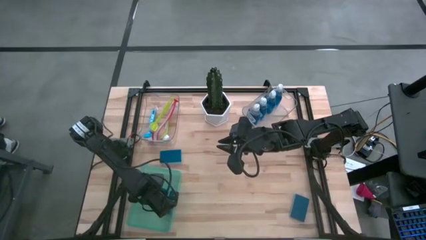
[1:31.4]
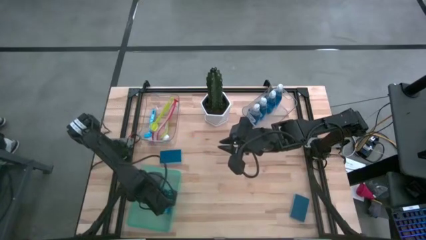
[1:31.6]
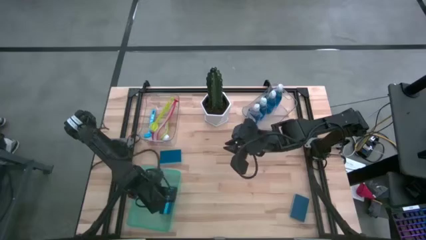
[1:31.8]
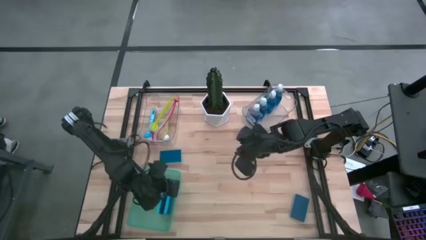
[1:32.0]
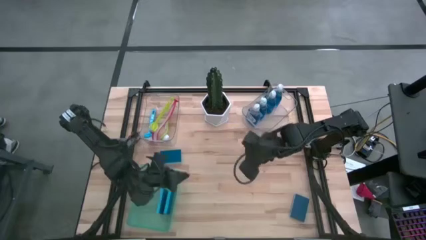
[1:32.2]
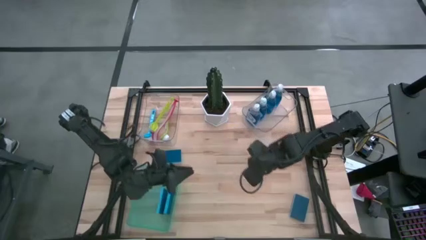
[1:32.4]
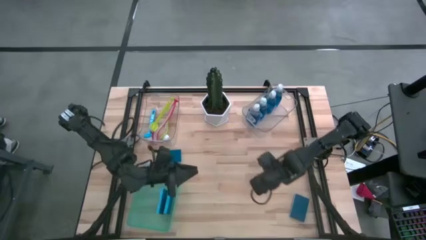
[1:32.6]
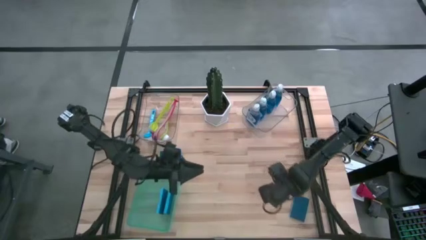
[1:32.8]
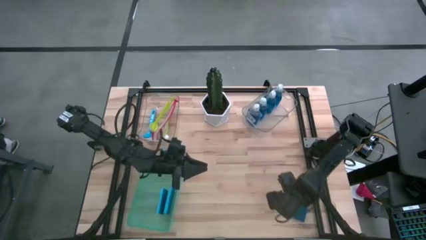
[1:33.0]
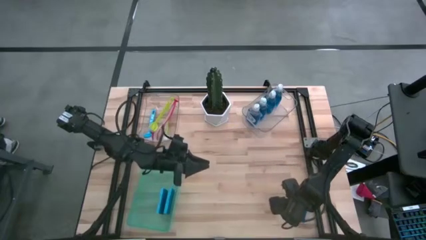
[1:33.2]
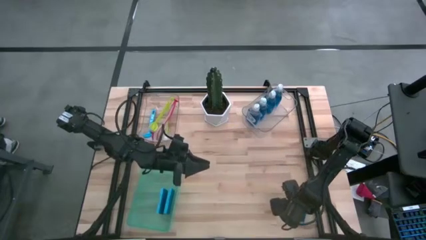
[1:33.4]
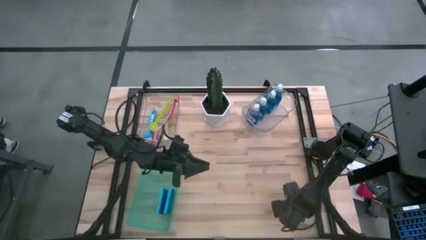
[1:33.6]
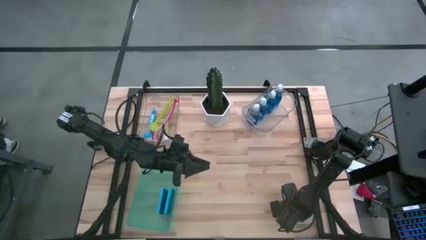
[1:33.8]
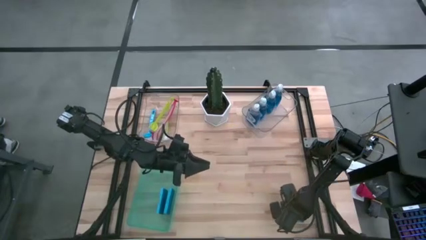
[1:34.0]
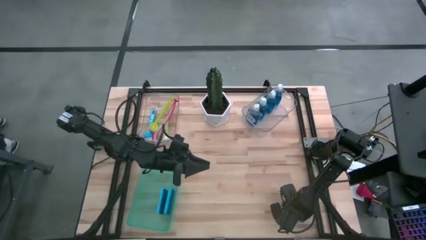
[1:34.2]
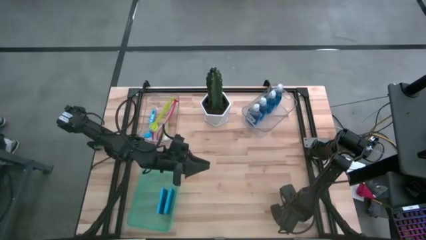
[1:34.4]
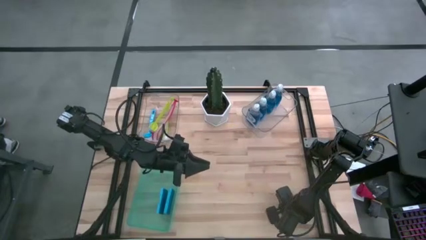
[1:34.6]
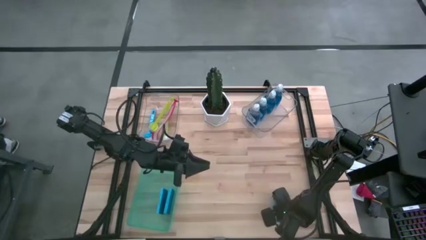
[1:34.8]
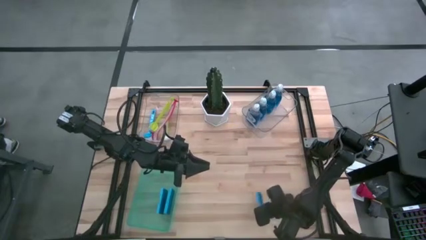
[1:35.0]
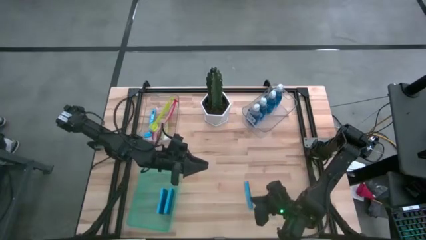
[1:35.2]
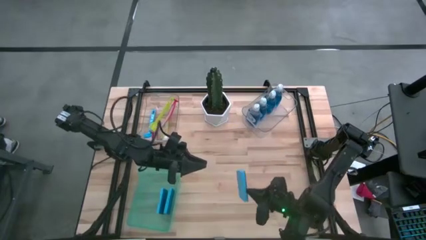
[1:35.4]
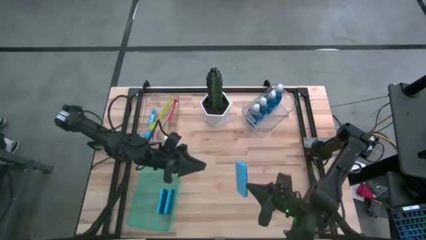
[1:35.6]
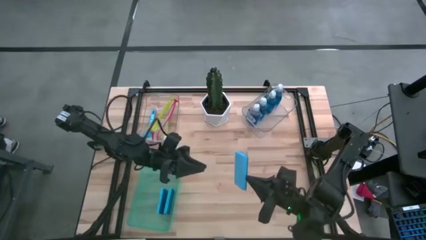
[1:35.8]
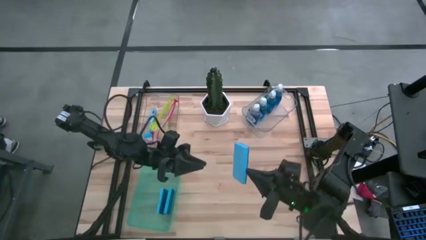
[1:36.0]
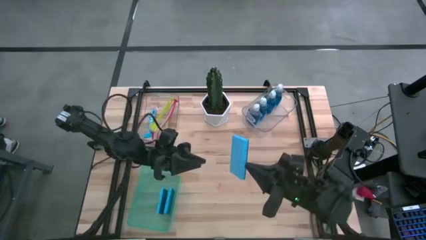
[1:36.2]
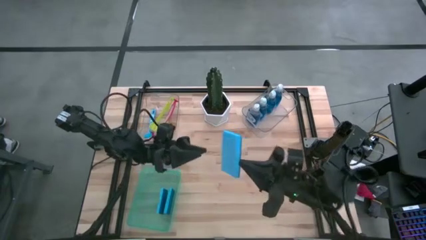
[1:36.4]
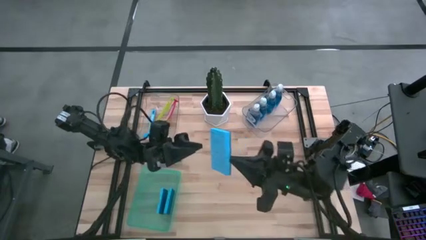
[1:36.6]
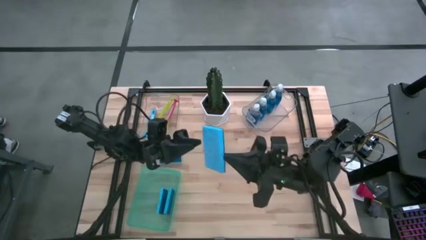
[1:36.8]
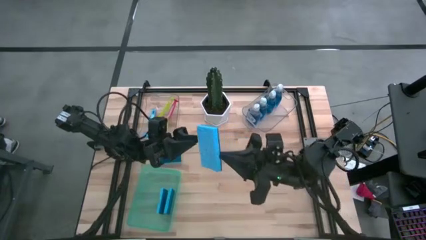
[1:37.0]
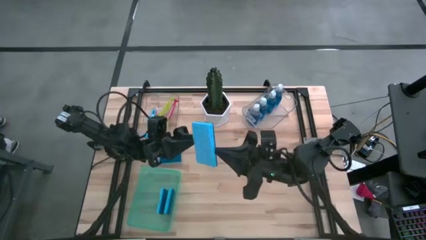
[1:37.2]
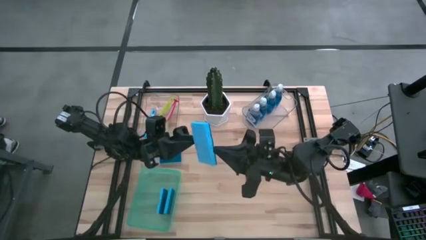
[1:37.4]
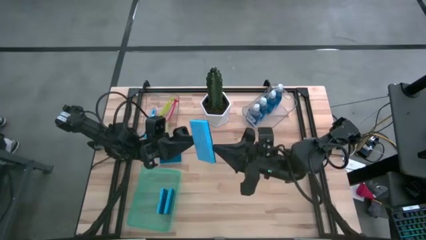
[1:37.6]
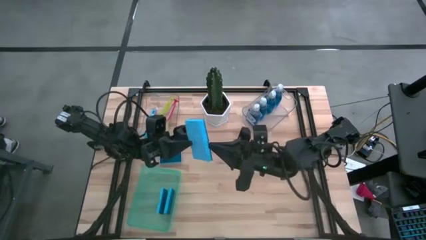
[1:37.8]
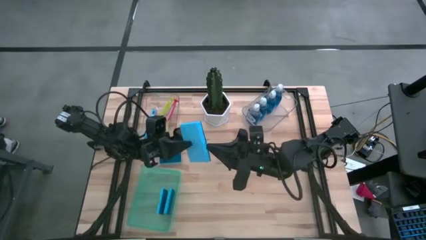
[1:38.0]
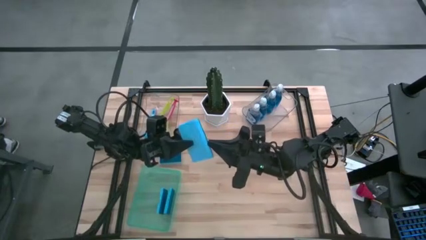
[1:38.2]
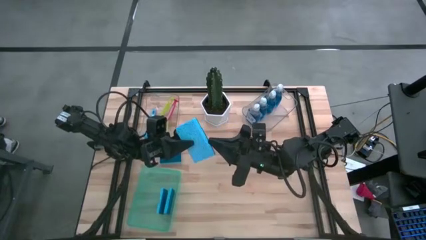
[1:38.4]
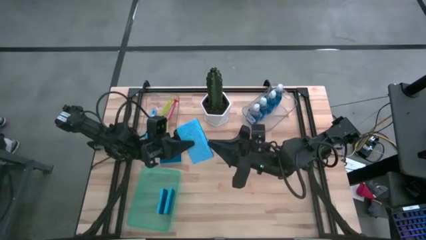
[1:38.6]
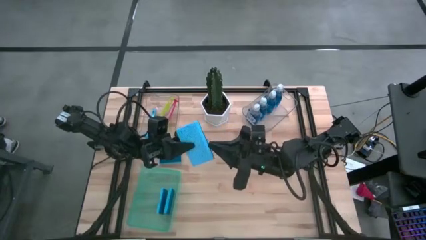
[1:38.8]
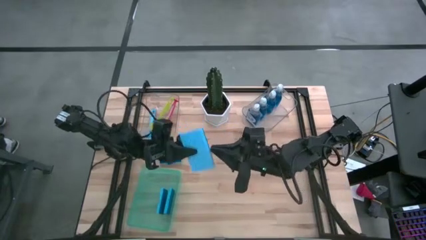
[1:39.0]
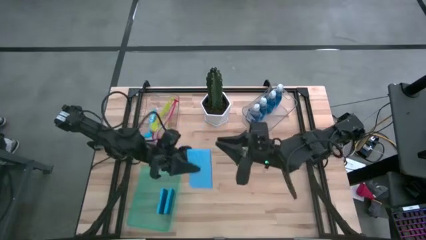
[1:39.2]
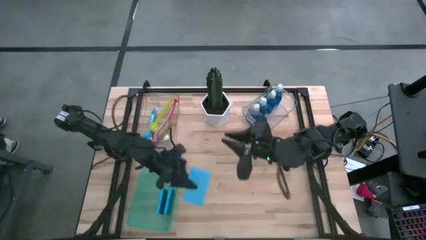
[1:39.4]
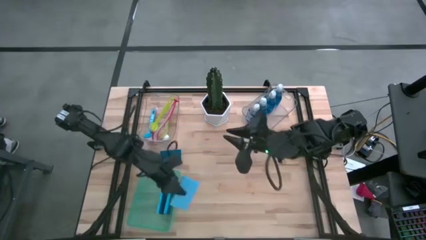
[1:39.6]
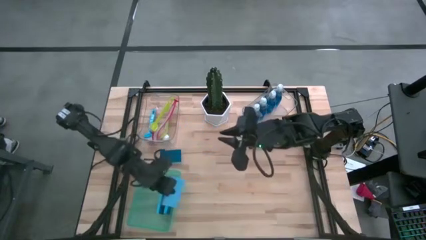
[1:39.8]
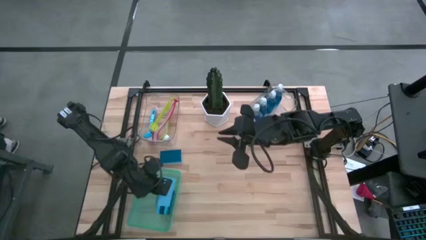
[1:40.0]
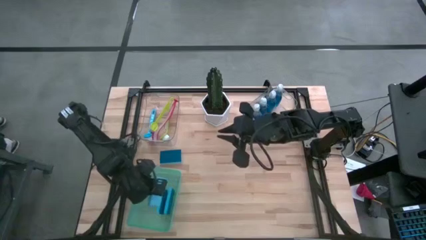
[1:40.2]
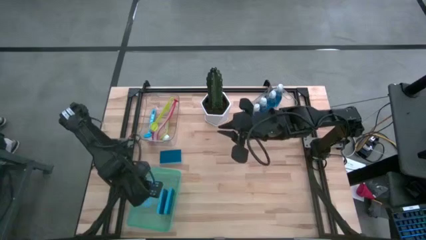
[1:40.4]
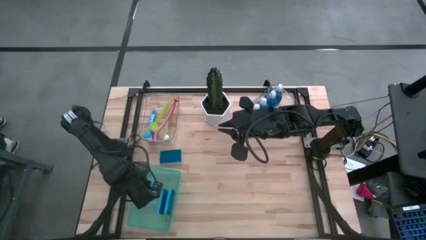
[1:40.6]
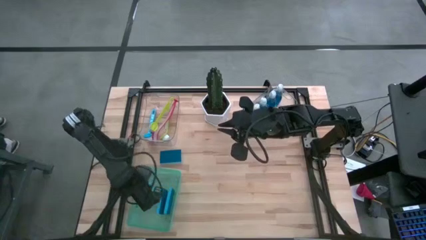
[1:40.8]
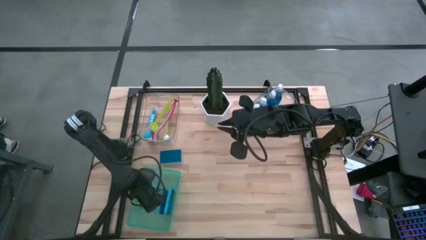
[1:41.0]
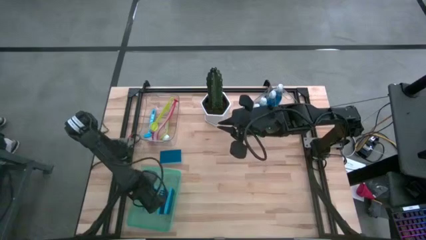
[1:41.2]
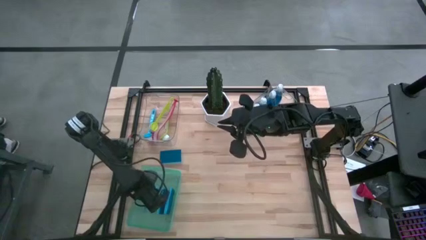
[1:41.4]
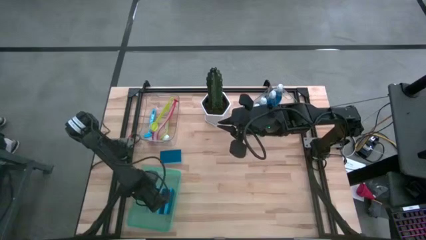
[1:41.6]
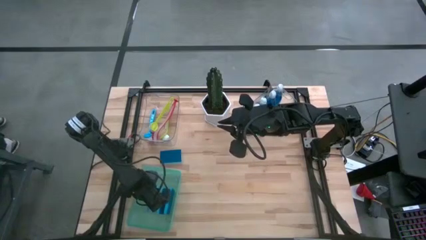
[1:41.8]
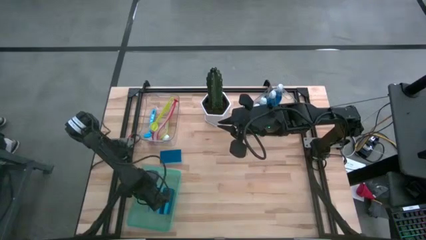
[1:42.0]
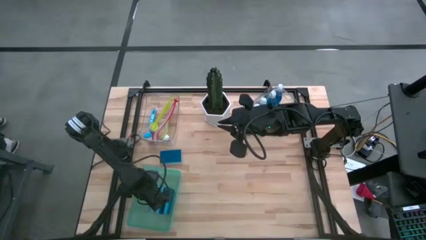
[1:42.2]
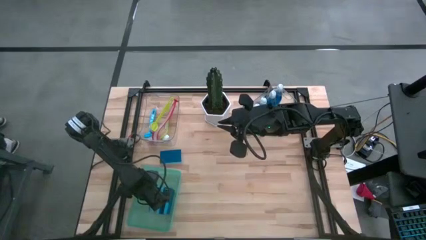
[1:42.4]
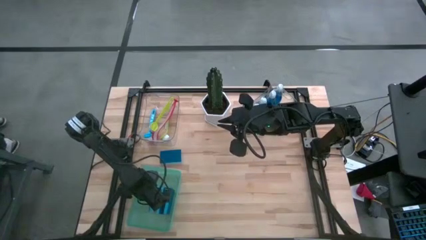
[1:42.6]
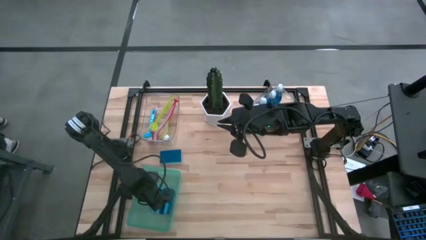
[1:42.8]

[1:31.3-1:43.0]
Task: Pick & Place Kitchen Sink Supplies
Put the sponge into the green bin
